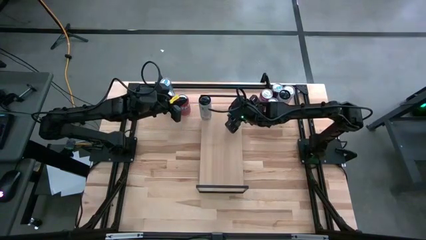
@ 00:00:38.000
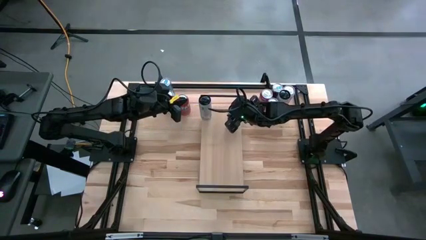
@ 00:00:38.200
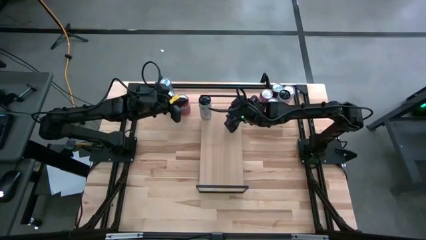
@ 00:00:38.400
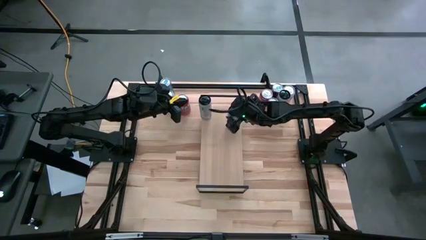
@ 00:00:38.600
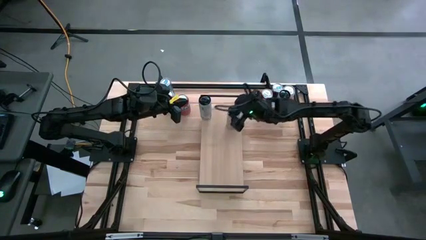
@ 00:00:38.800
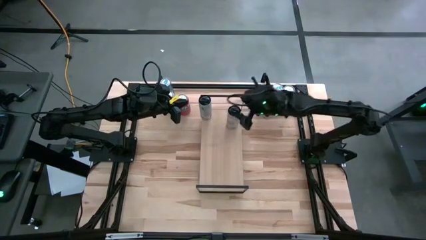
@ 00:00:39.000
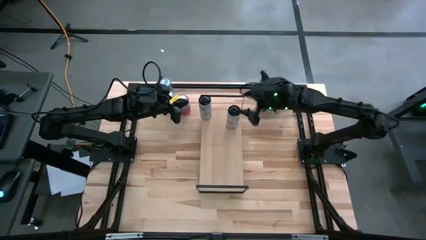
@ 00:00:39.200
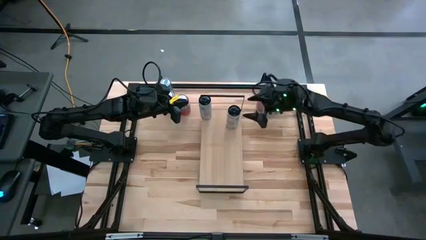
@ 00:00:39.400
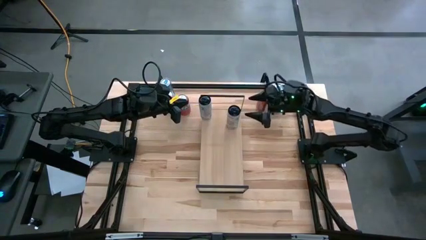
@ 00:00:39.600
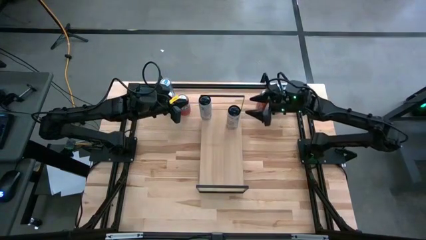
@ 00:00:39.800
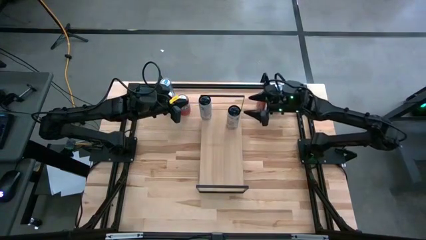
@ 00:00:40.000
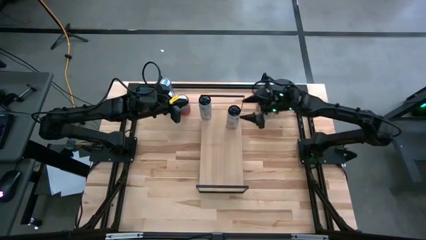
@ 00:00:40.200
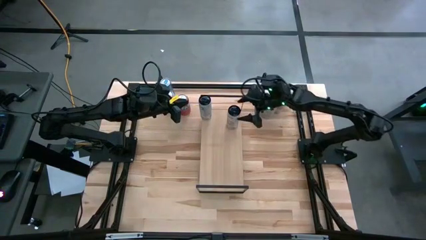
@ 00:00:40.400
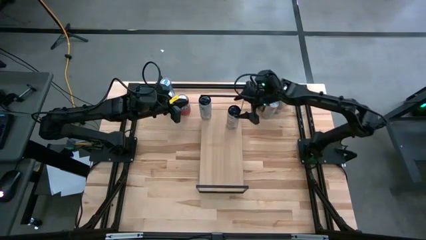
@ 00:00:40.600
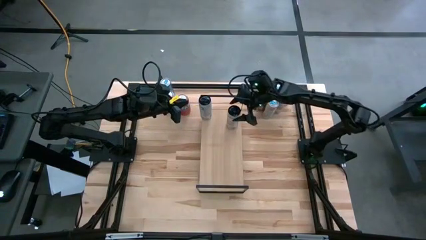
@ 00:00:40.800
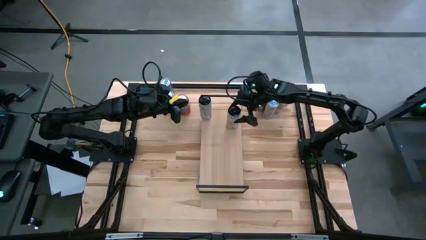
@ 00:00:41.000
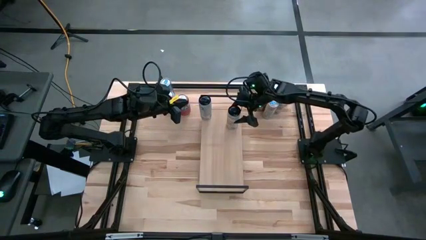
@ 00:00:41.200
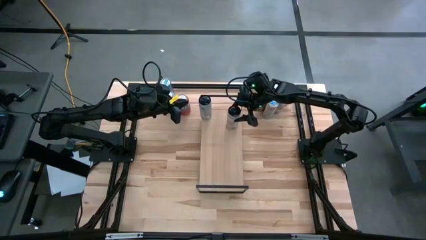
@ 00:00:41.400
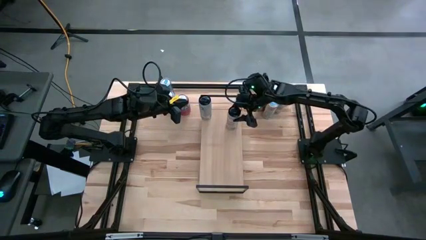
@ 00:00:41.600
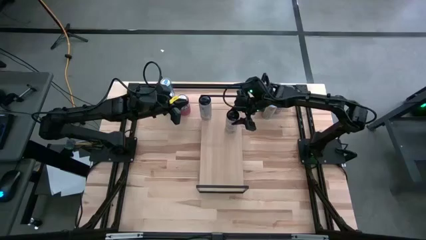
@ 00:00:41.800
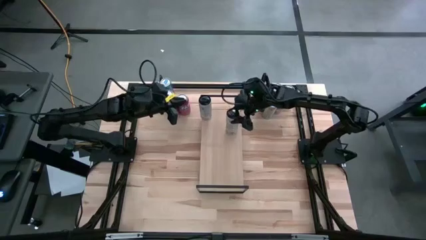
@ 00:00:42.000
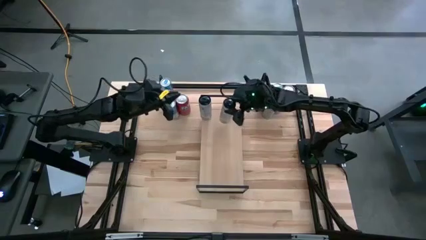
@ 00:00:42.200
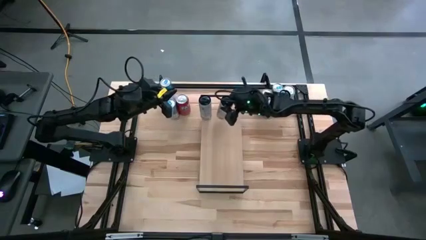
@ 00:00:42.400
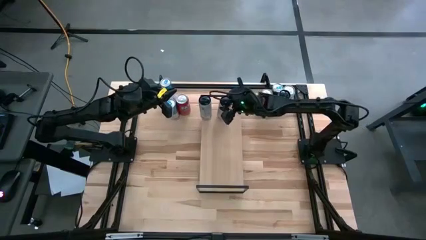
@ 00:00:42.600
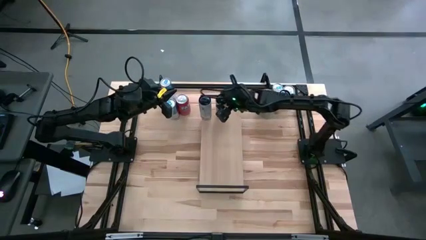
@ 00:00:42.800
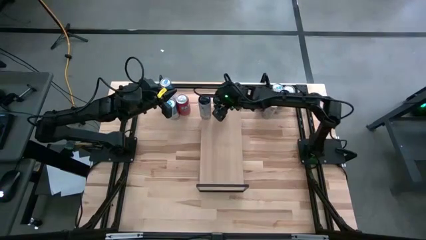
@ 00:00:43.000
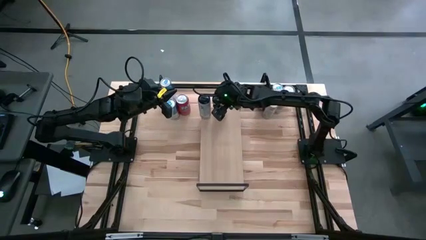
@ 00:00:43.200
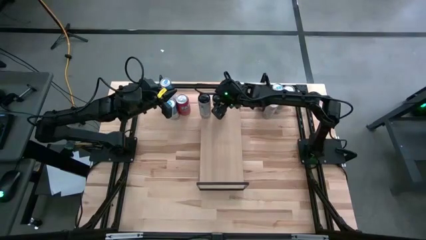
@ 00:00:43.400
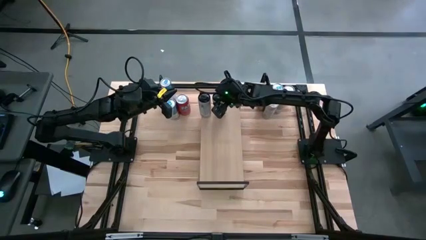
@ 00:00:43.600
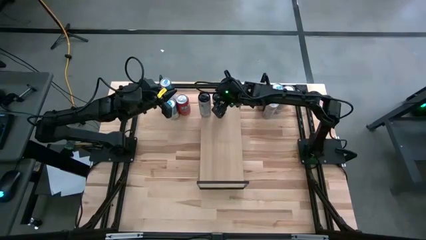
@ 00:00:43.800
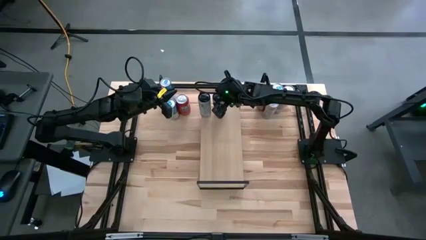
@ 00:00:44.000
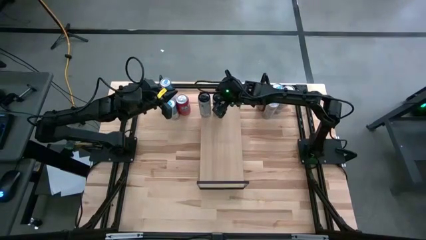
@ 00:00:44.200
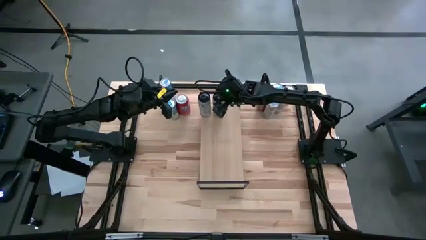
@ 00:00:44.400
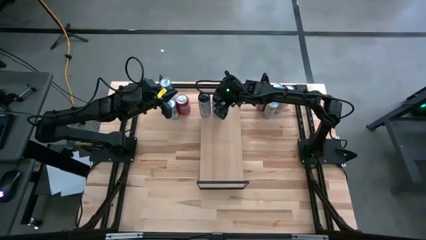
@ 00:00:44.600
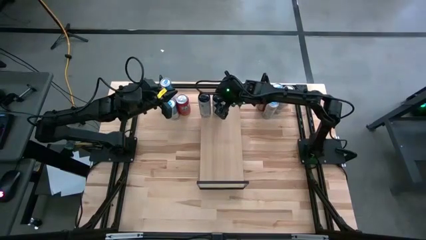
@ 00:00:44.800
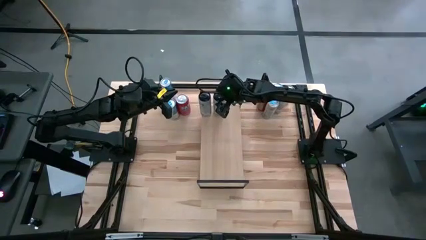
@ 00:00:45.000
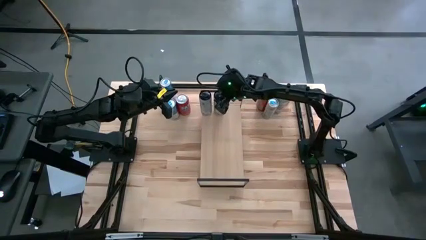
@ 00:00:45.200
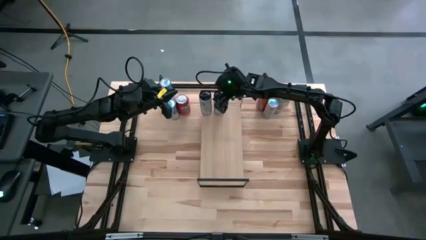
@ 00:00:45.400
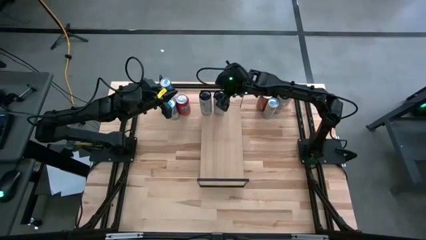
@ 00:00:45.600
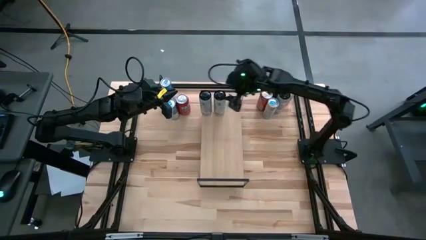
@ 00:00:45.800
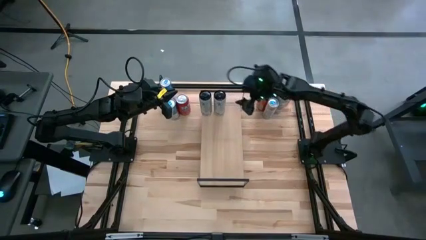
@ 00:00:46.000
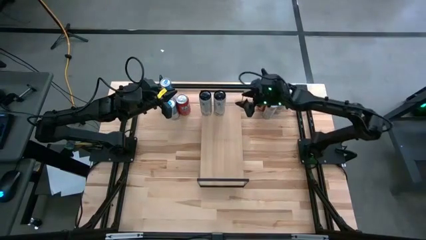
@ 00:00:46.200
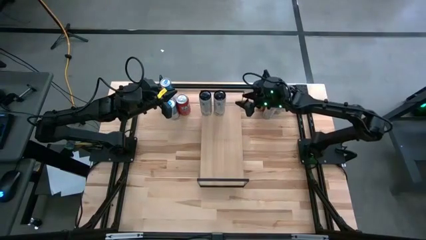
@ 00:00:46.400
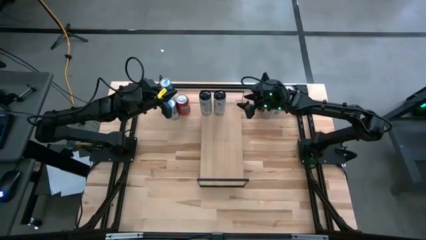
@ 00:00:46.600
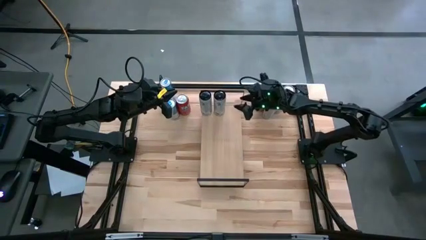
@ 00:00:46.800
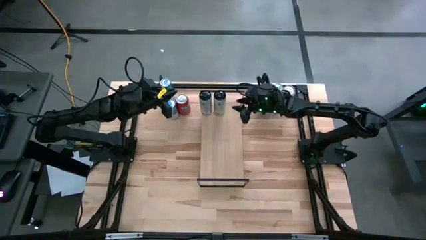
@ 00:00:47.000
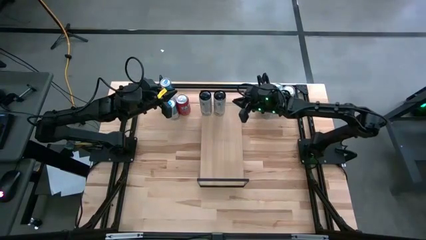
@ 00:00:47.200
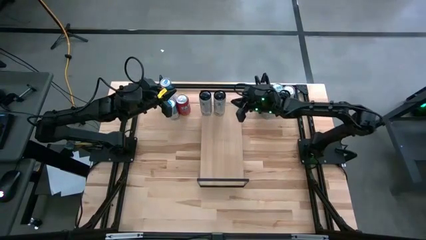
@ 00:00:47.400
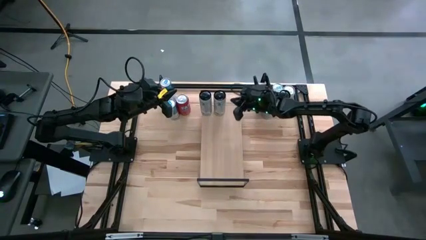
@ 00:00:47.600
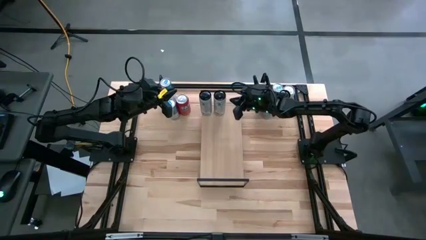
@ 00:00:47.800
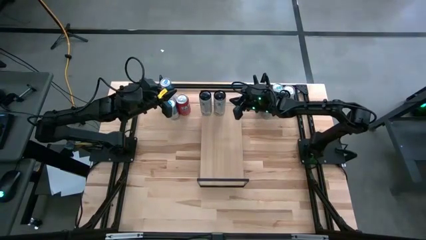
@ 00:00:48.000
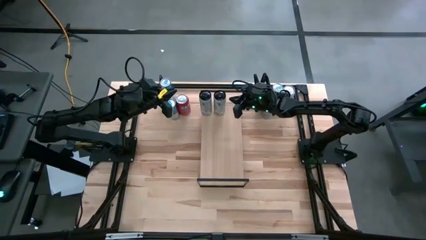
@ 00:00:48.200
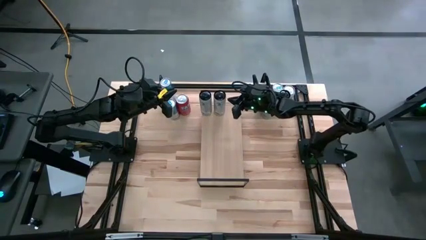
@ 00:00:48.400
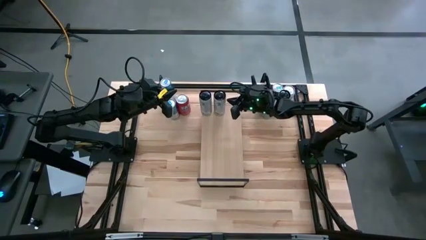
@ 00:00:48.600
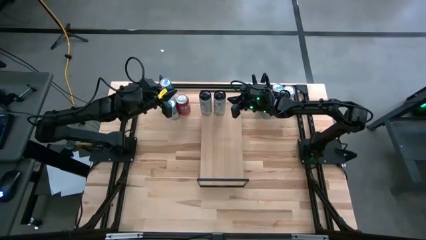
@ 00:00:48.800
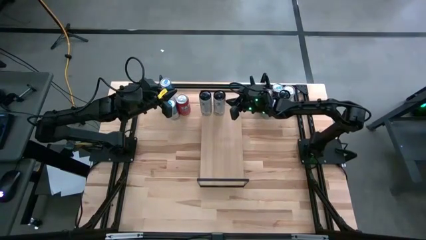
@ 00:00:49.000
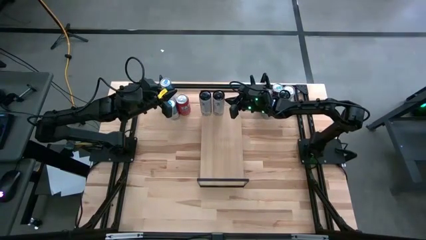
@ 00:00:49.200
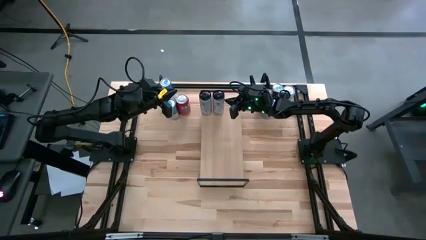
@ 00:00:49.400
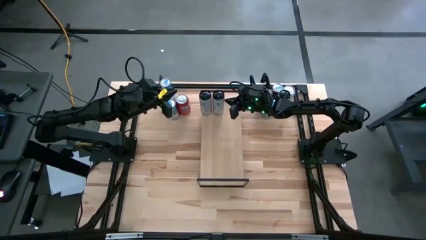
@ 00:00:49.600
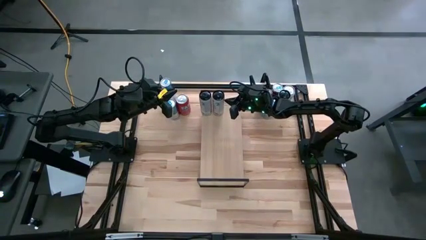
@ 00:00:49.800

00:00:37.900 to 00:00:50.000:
Task: Place canned beverage on shelf
Put the left white-pink soda can on the shelf aligned with the other white-pink soda can

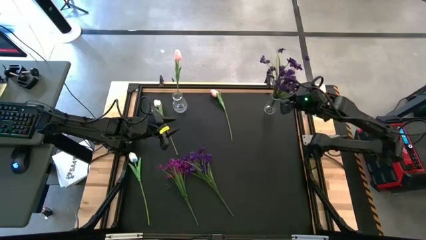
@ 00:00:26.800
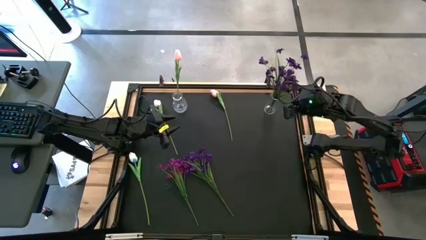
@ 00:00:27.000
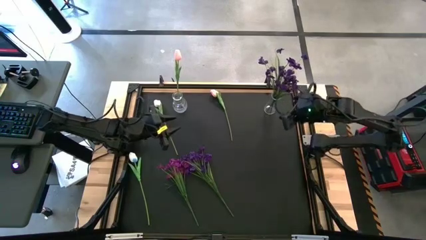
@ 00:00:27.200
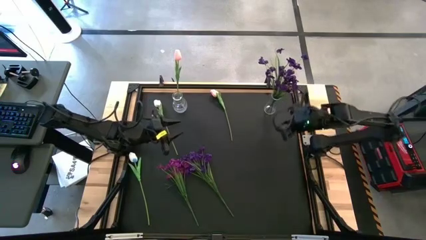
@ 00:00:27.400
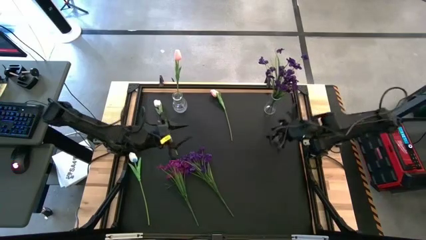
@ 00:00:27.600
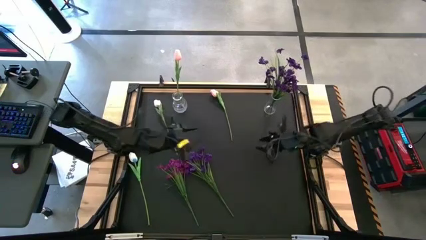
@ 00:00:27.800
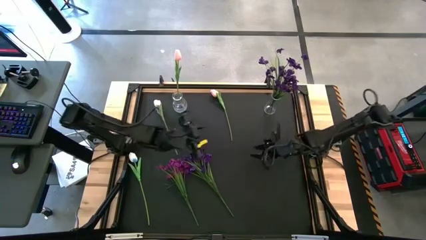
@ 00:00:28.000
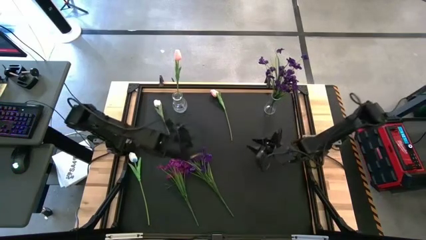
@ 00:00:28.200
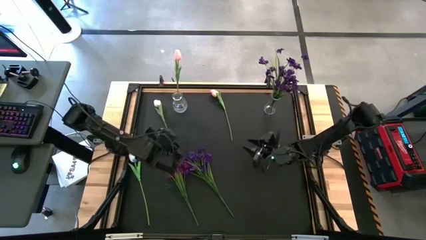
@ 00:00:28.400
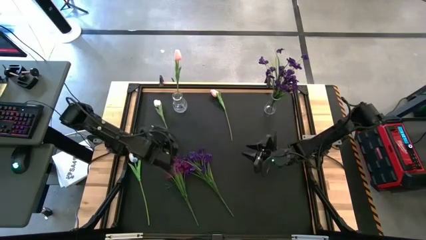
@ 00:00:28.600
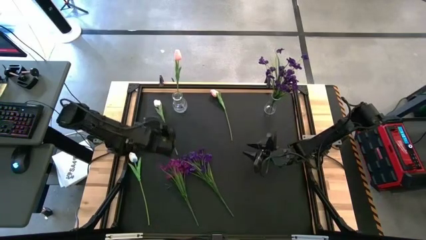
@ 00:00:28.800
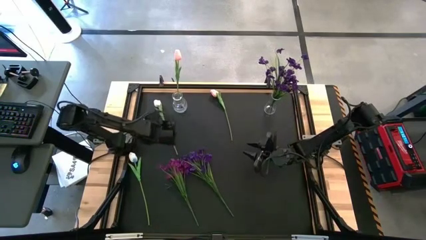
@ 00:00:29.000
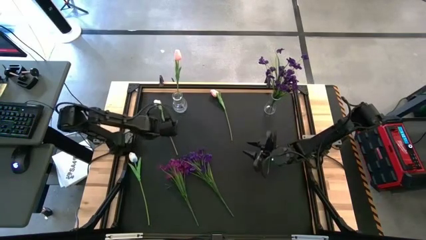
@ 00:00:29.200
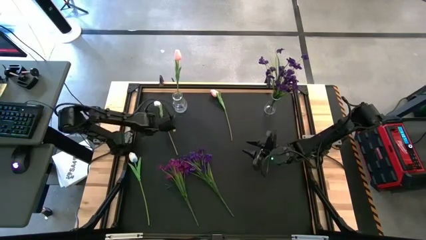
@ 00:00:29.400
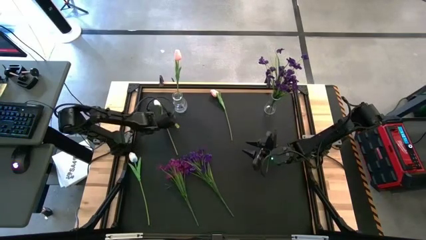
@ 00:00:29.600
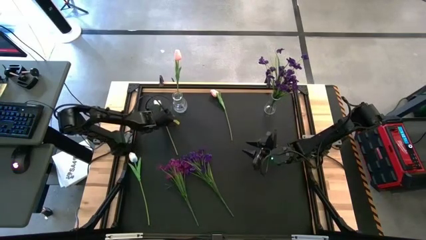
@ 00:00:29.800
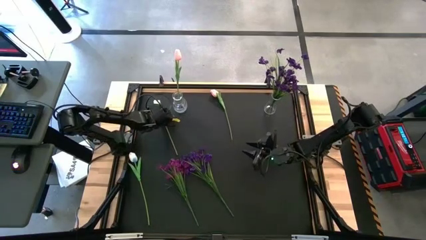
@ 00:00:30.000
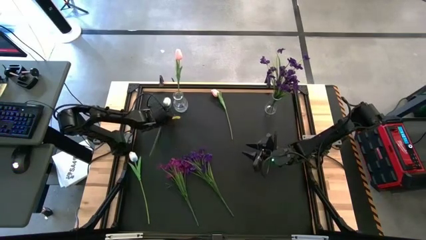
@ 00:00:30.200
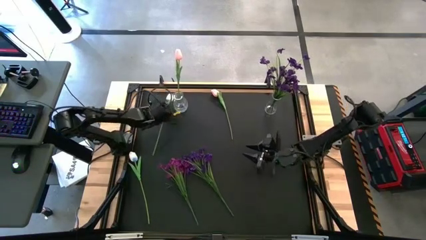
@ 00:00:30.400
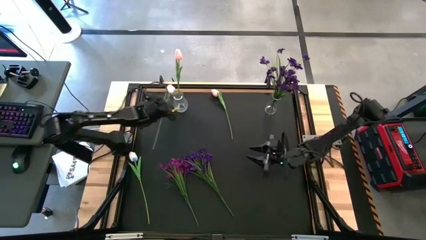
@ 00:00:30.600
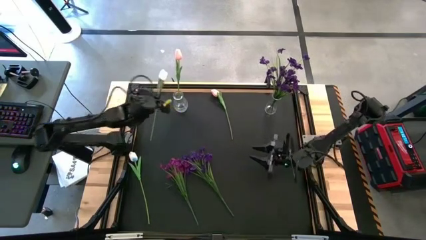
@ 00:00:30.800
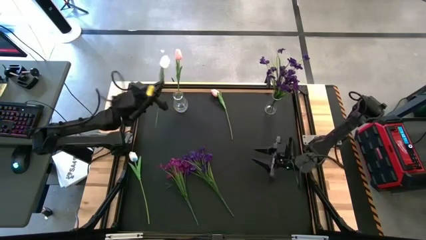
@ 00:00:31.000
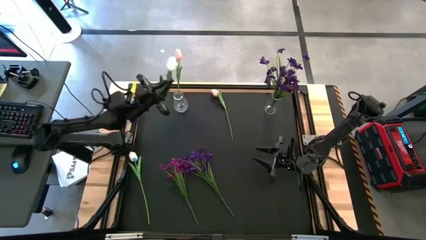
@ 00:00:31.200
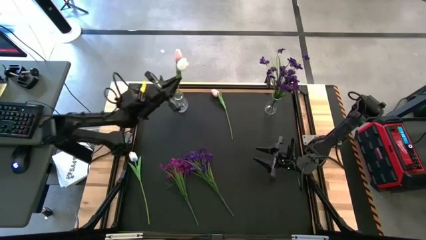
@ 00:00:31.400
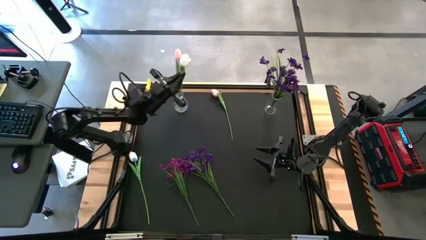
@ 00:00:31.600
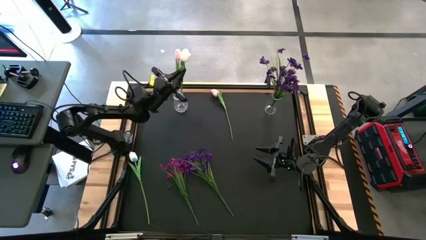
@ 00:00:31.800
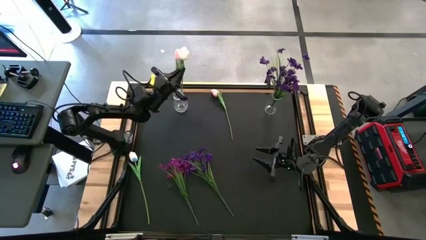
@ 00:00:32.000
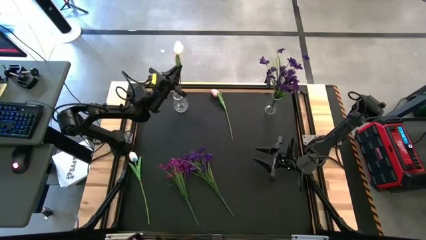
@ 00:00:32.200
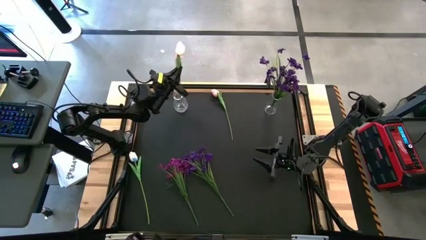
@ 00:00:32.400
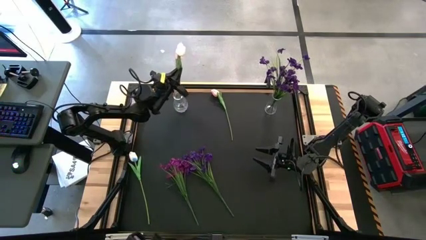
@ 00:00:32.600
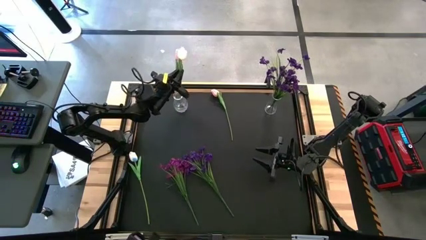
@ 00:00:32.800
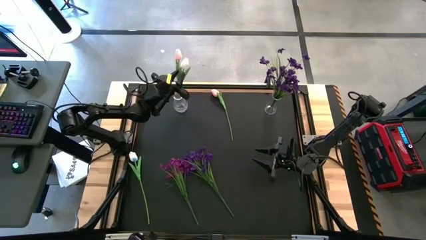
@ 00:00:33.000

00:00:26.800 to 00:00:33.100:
Task: Sort flowers into vase by color
Put the top white tulip into the left transparent vase
